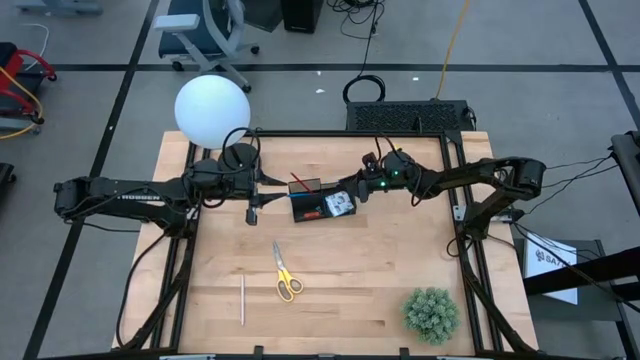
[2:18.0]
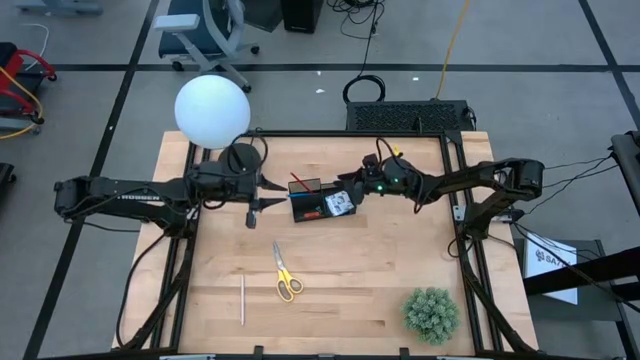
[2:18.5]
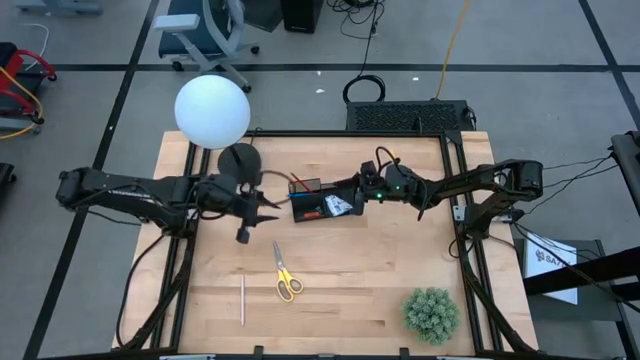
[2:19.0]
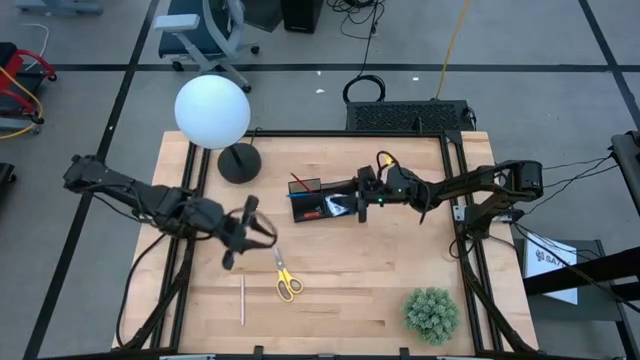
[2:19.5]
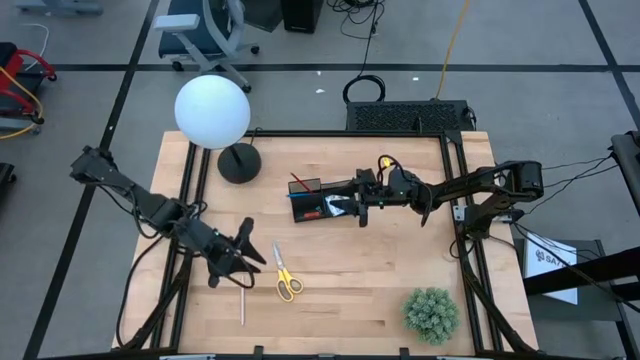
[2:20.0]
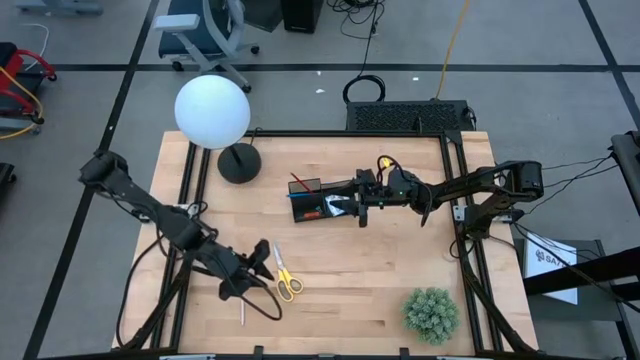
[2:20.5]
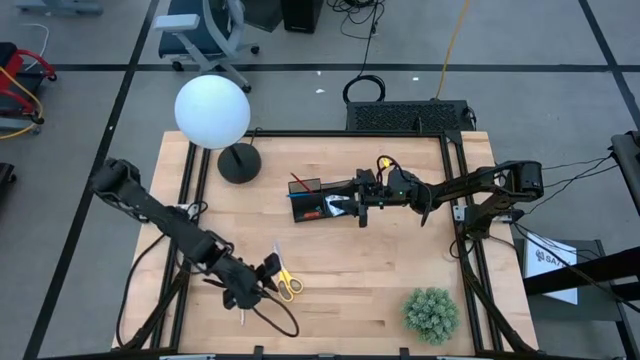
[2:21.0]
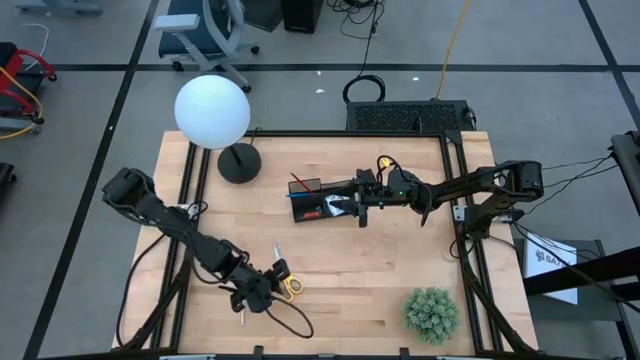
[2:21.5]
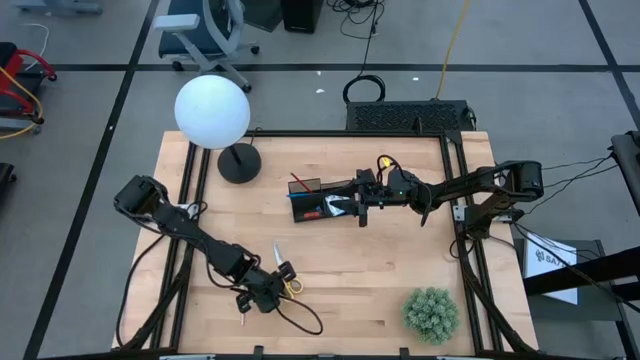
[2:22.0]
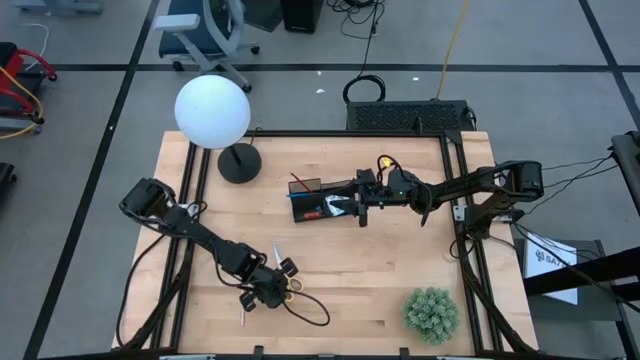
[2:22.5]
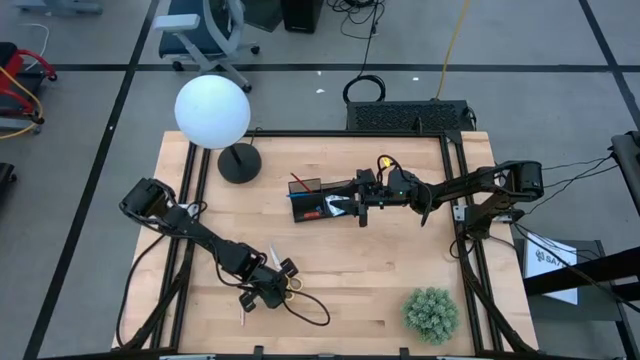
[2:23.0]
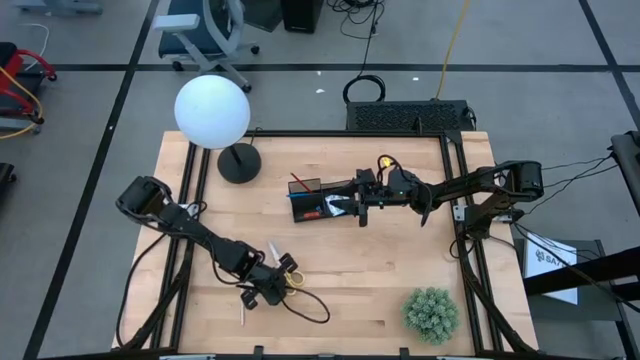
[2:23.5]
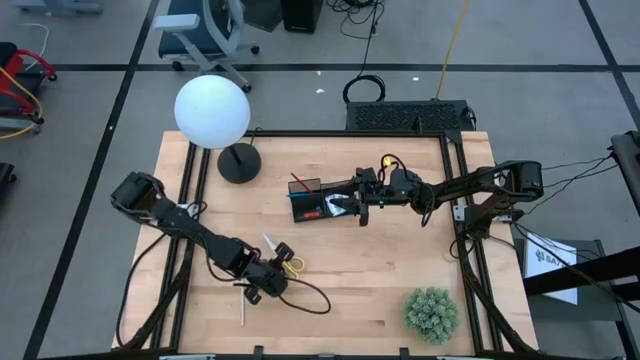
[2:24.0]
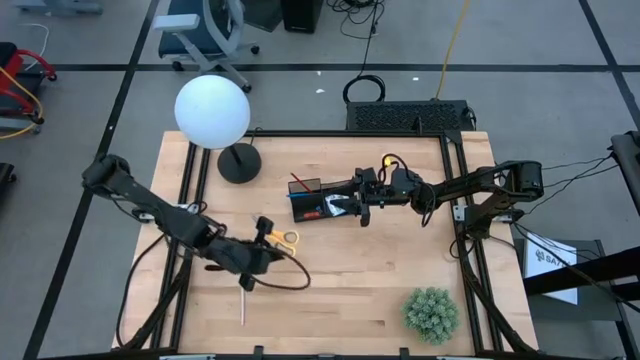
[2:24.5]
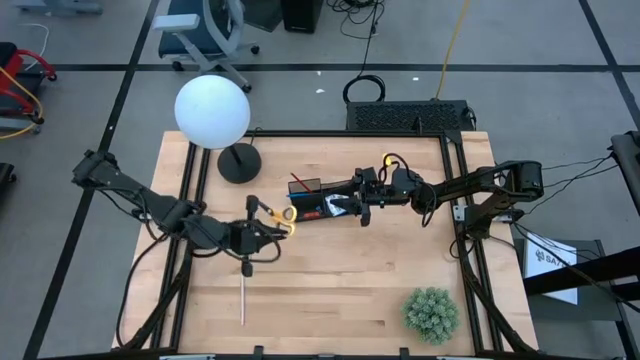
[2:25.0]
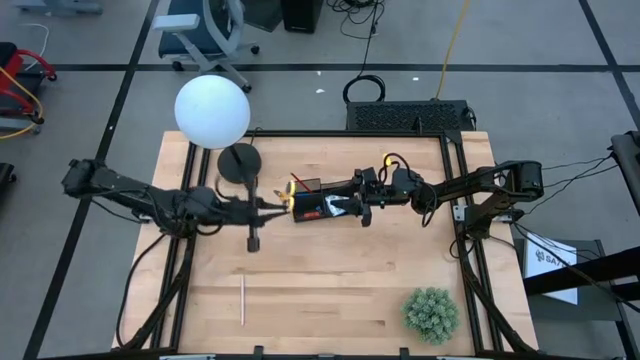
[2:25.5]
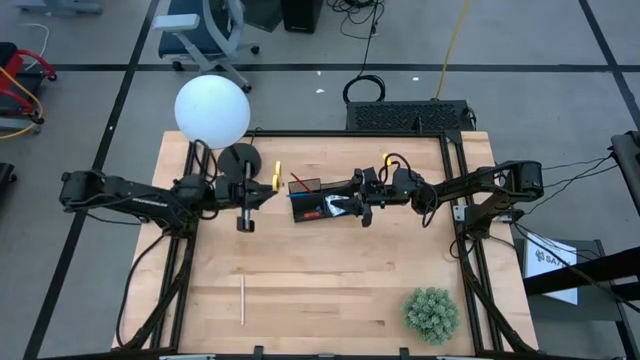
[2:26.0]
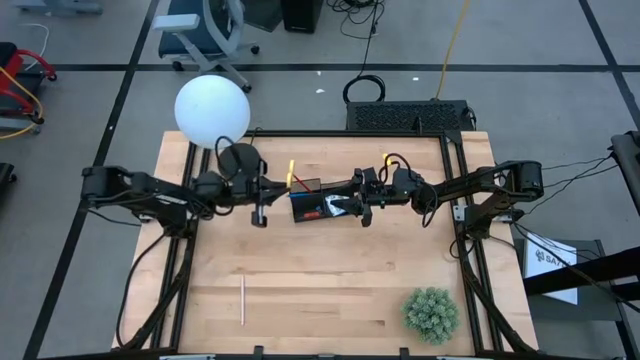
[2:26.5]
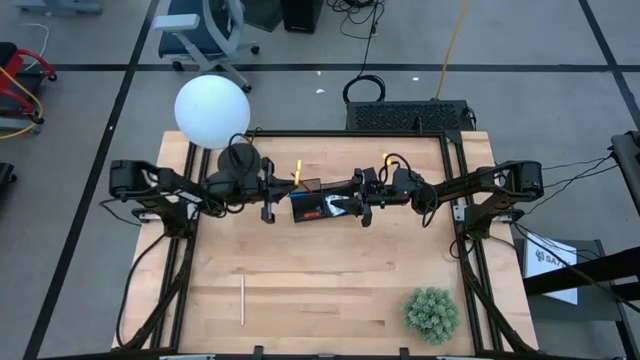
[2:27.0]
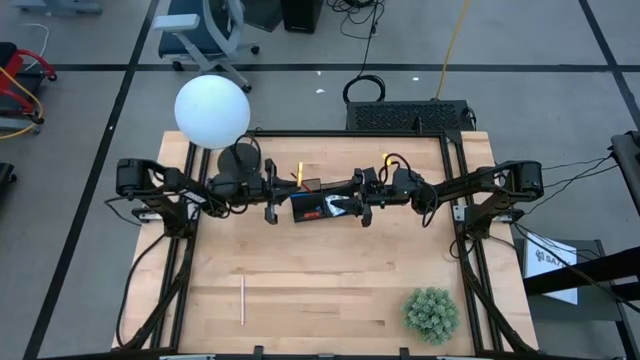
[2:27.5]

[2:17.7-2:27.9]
Task: Pick and place office supplies into organizer
Put the yellow scissors into the desk organizer

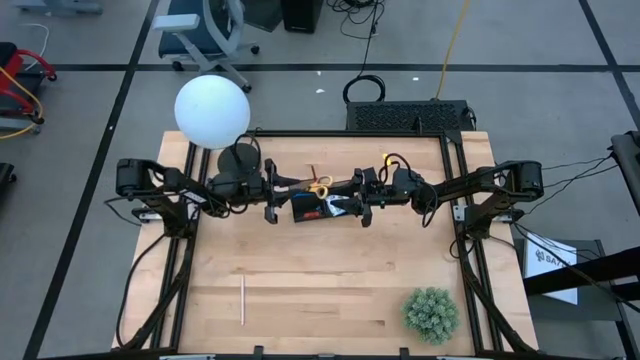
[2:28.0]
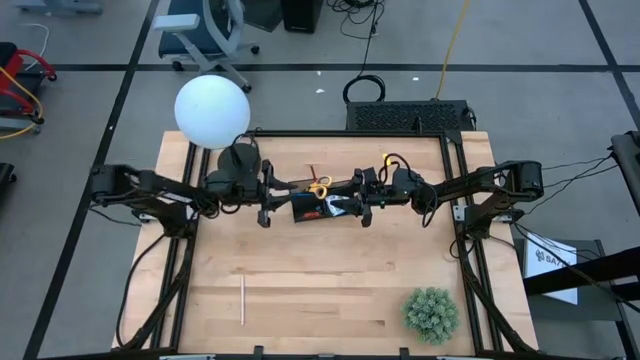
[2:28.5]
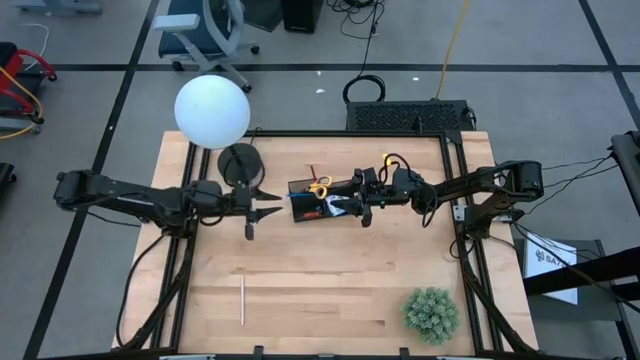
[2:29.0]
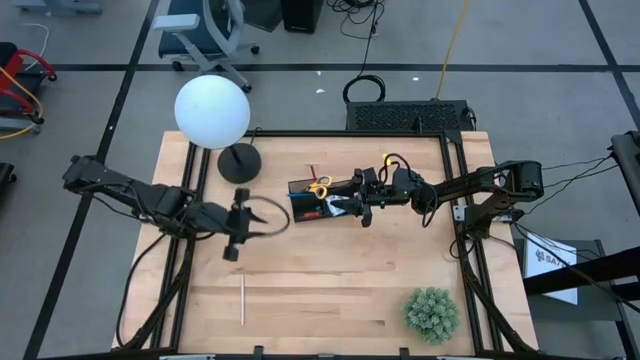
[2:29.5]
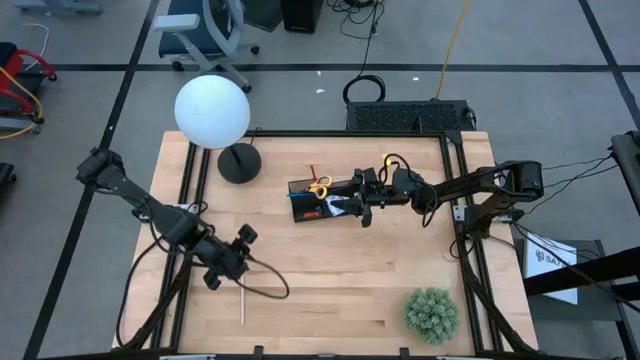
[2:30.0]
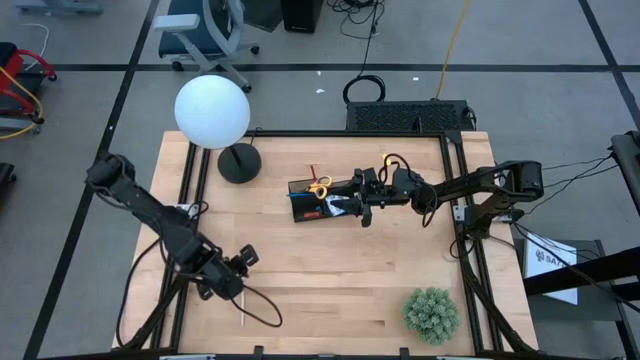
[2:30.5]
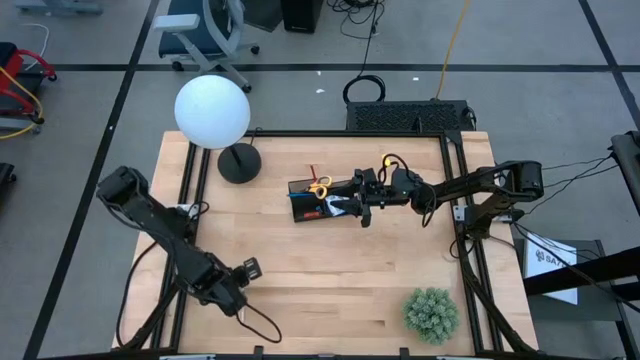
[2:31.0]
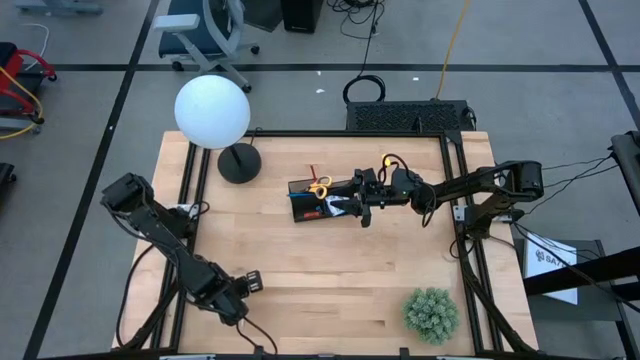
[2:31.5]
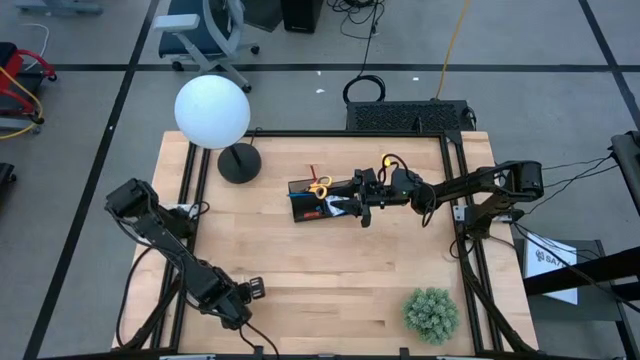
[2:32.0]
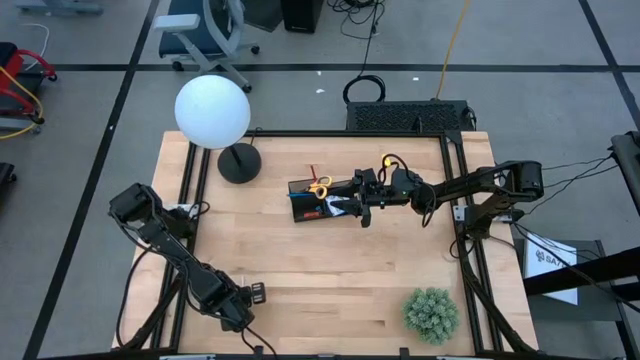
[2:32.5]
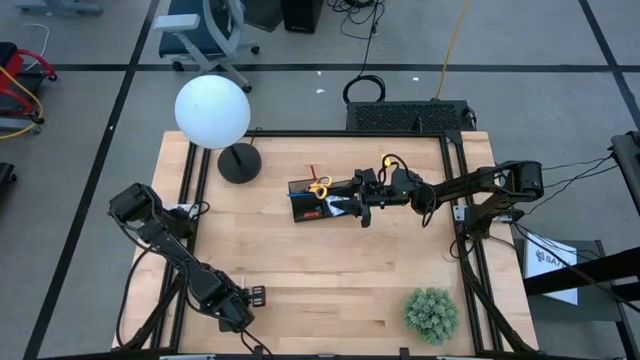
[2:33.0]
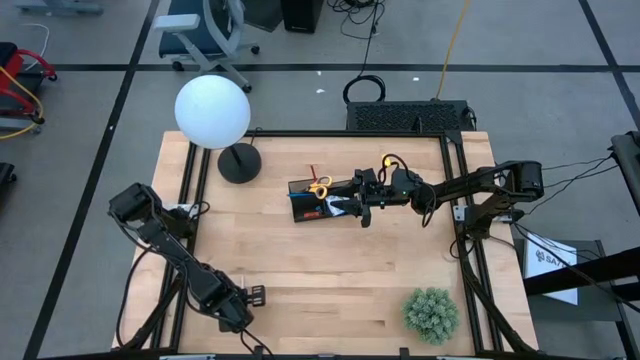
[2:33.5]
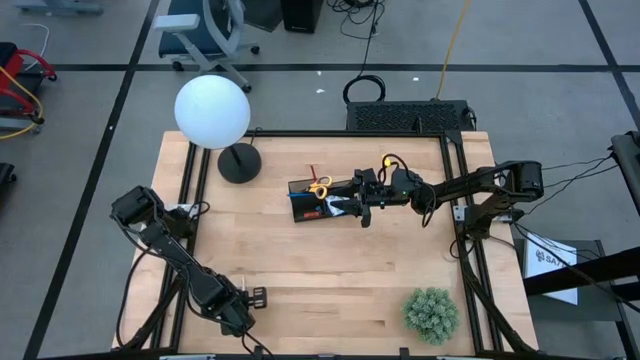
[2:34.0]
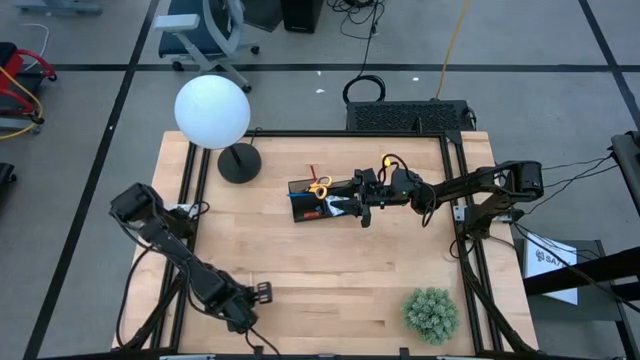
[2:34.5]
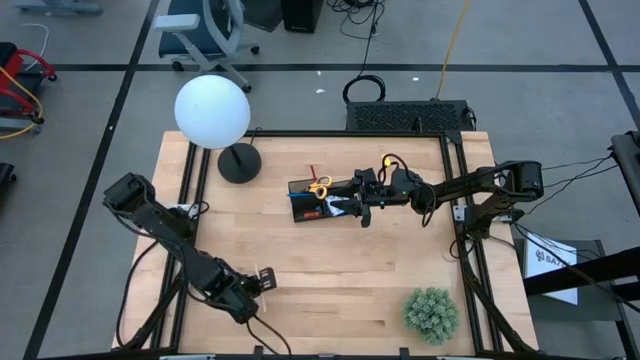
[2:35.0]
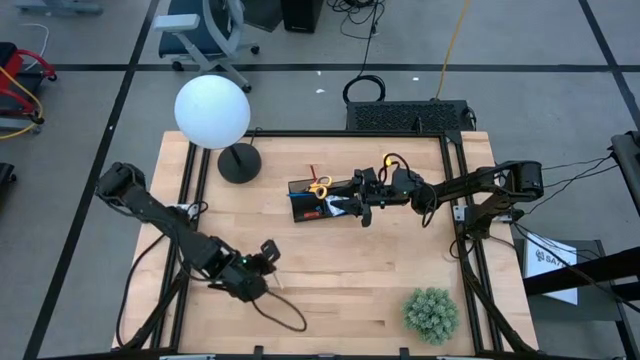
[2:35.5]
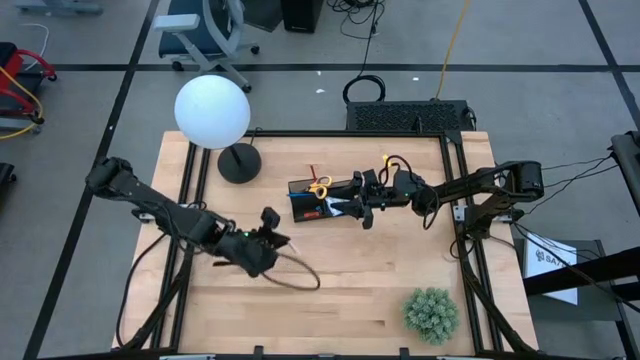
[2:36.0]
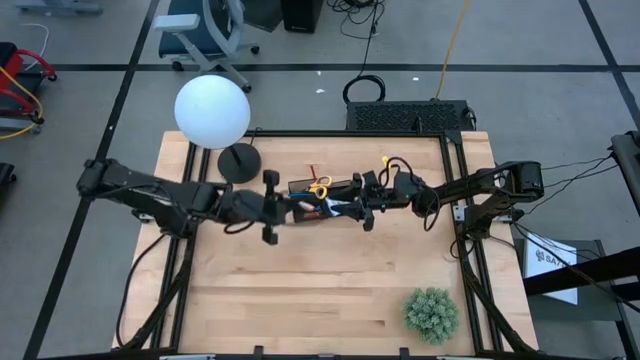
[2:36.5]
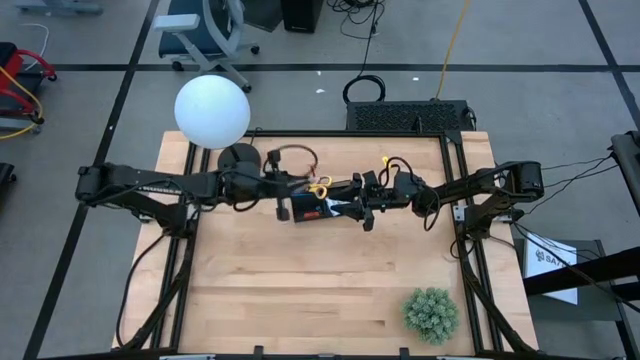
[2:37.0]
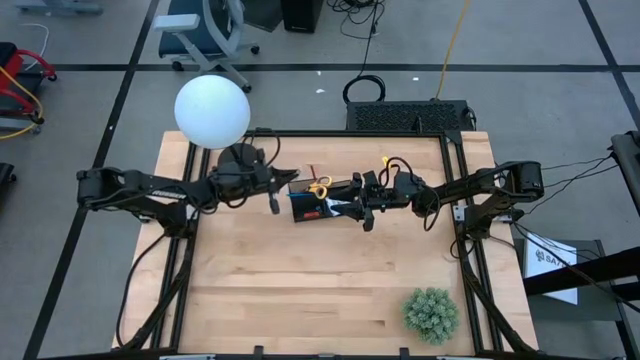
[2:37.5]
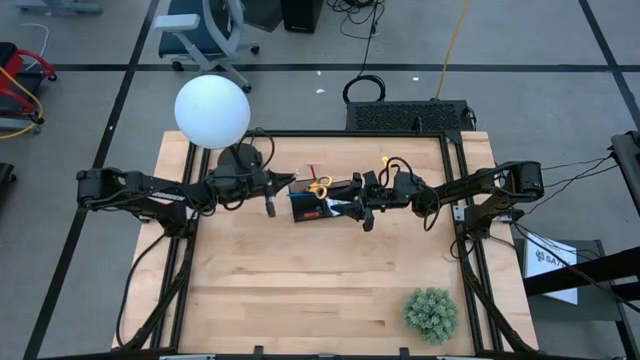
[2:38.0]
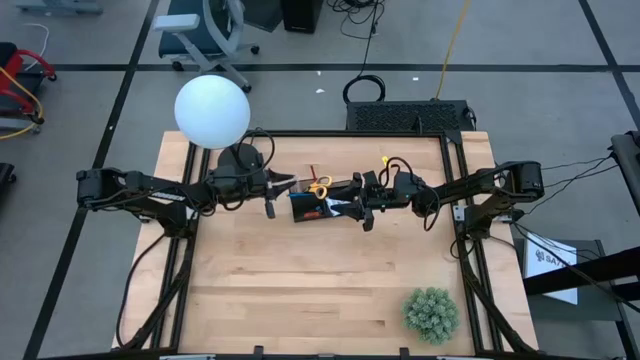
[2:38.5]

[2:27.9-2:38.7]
Put the light pink pen into the desk organizer

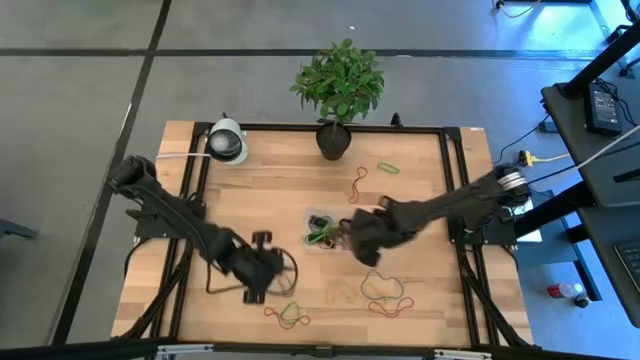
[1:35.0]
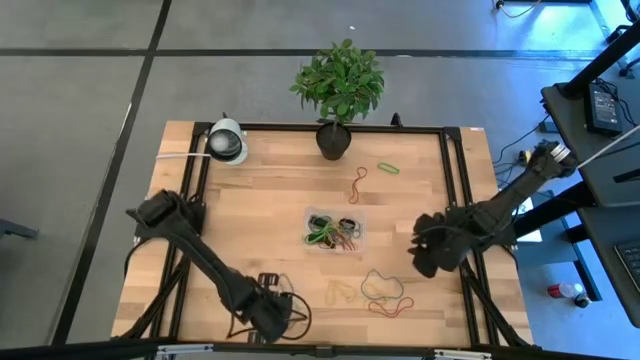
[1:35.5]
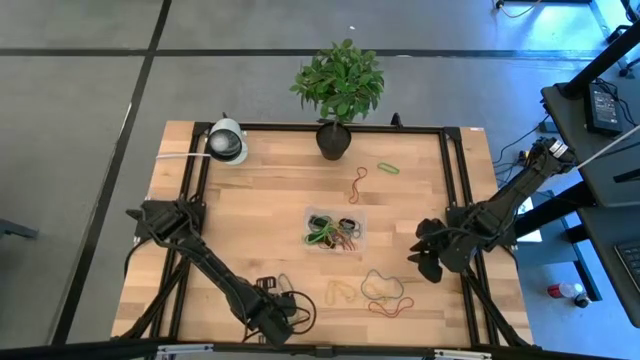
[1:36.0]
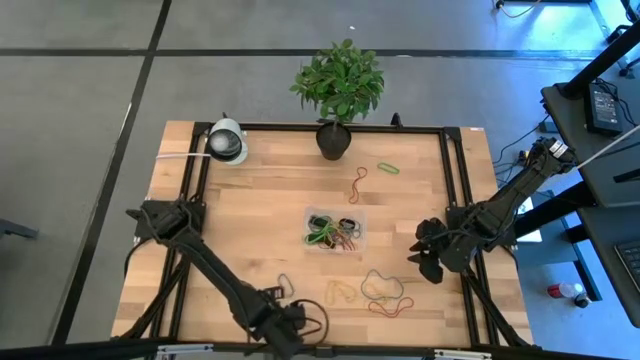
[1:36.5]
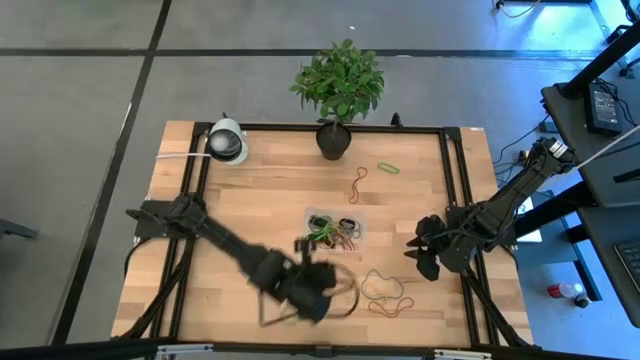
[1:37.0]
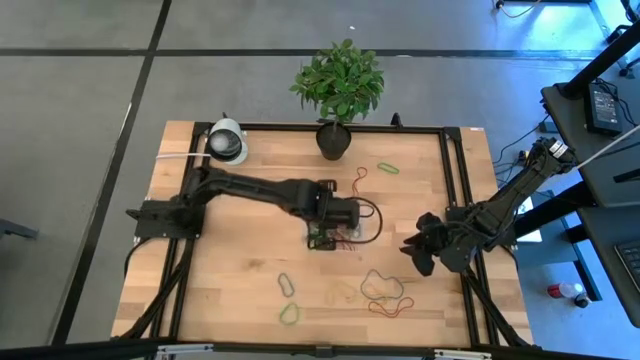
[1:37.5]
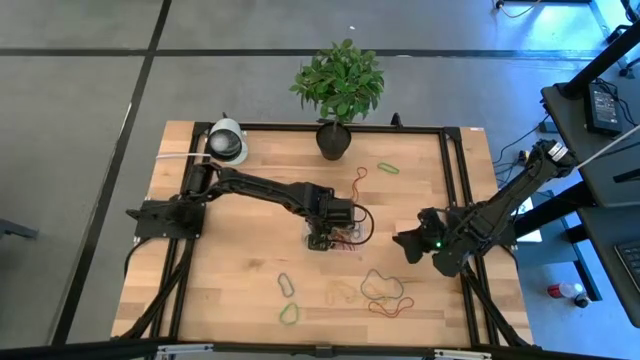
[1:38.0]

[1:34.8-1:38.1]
Task: Pick and place rubber bands into bin
Put the red rubber band into the bin
